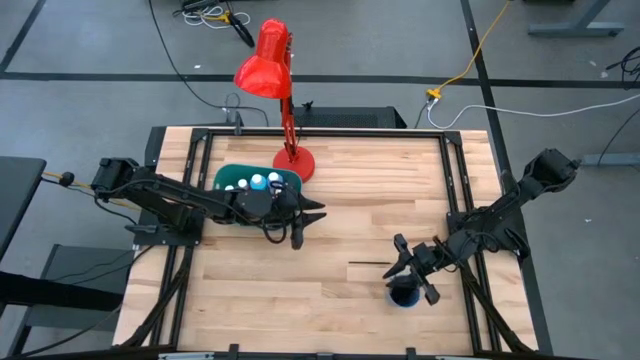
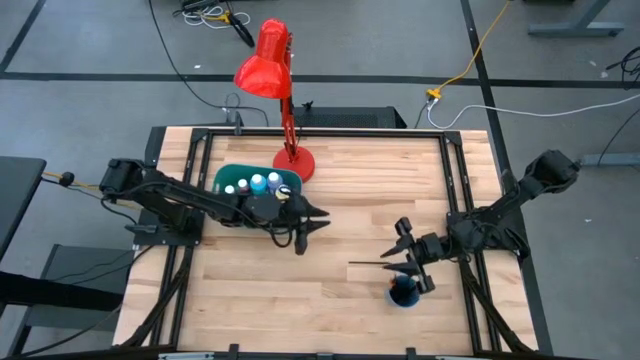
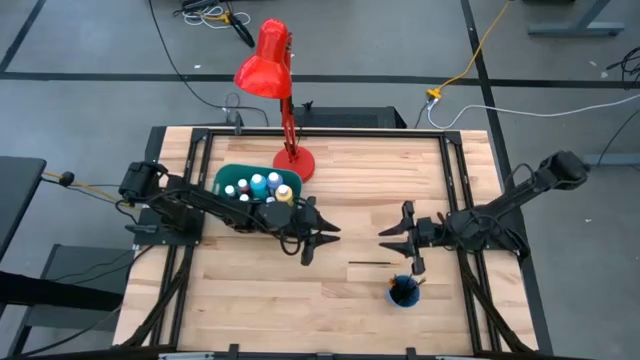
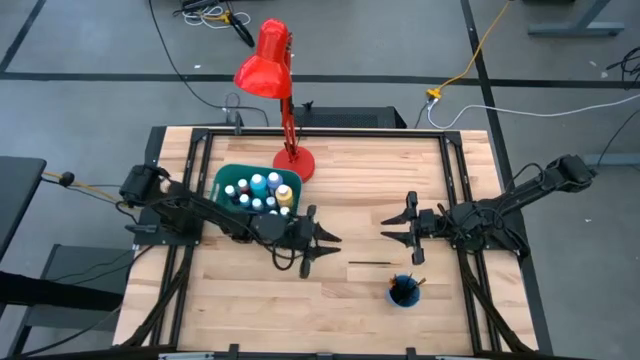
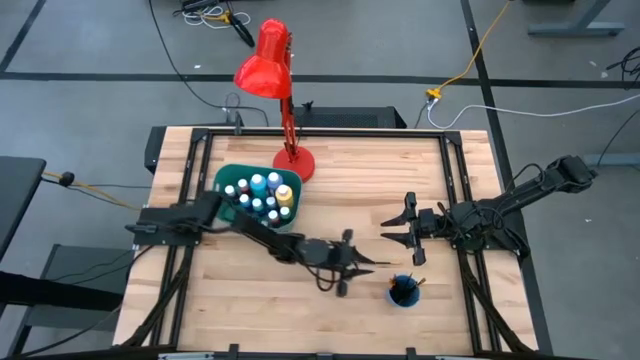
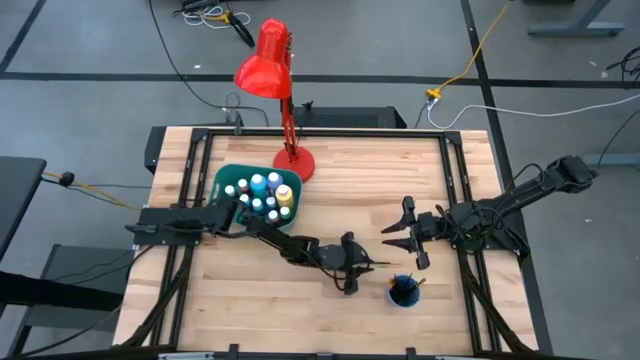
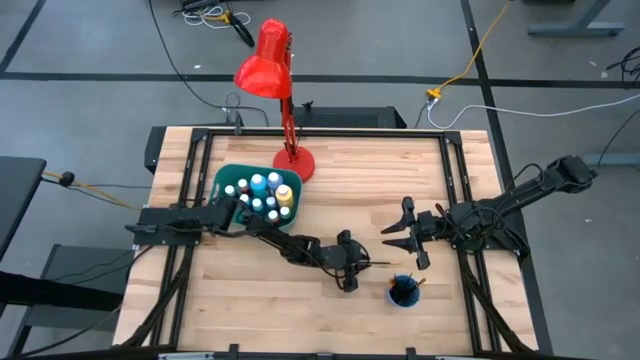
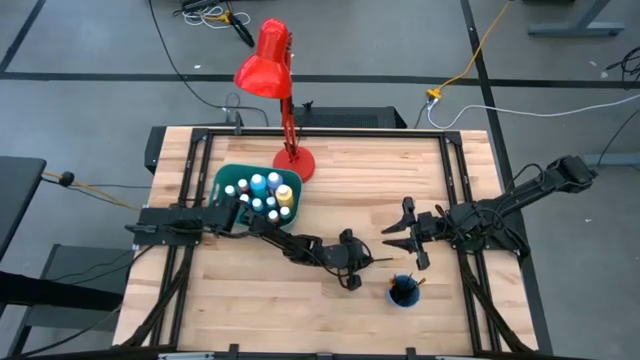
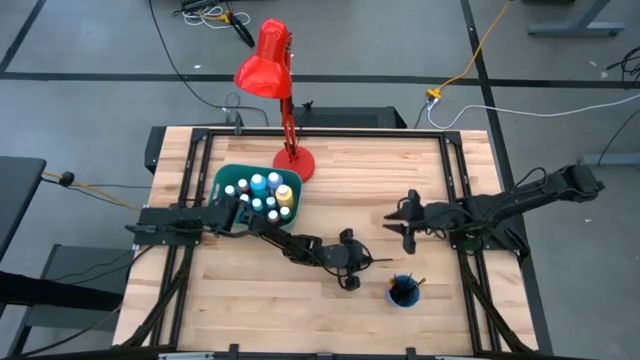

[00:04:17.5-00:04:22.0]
Task: Pick & Place Paint Supplies
Put the gold paint brush into the blue cup

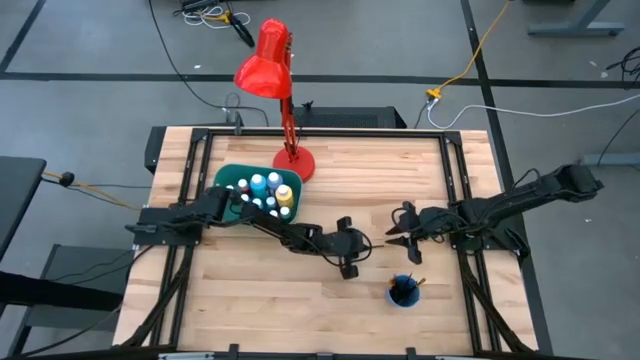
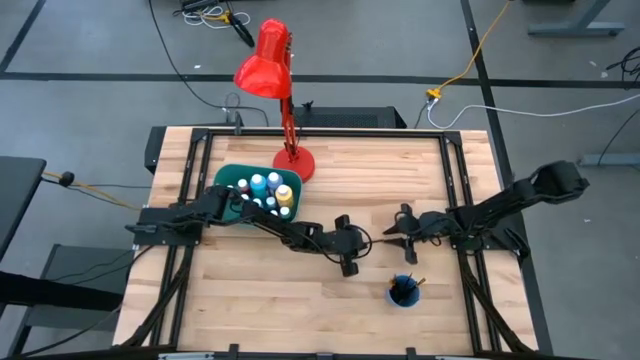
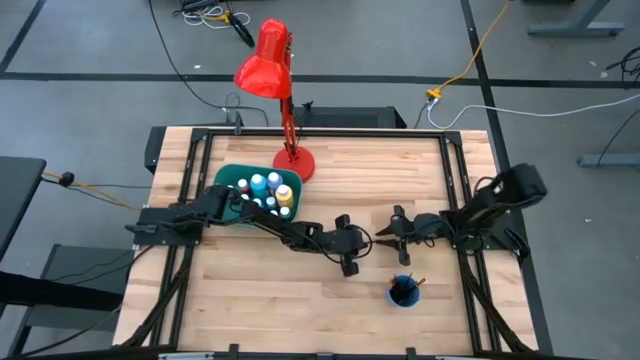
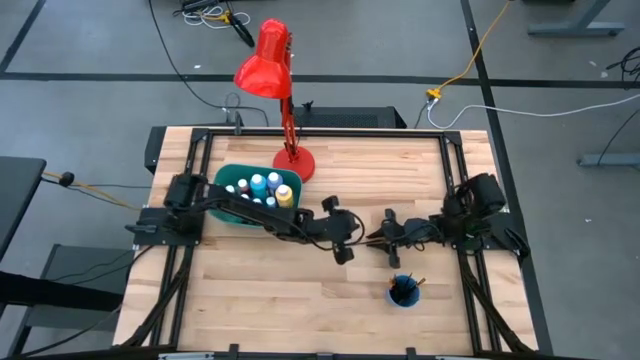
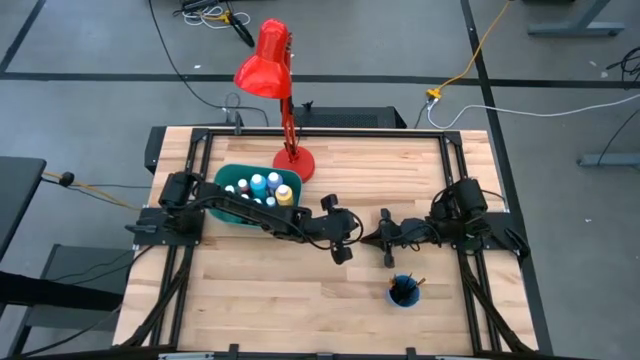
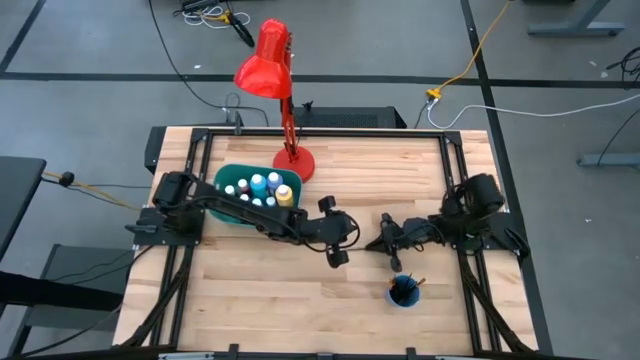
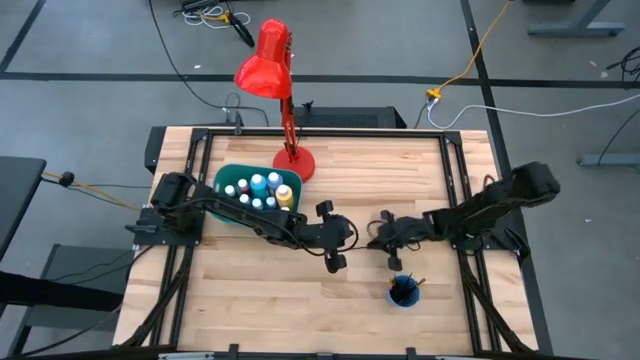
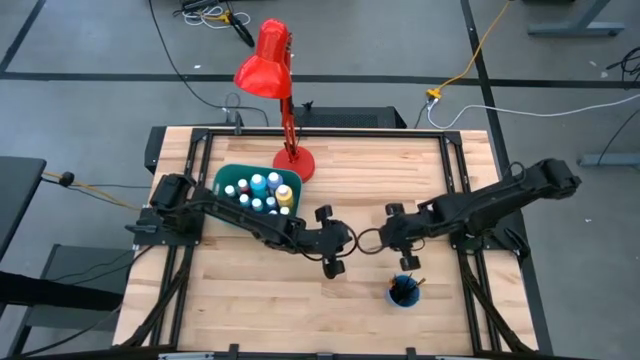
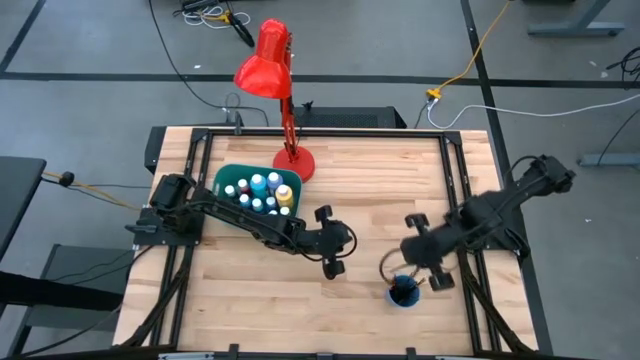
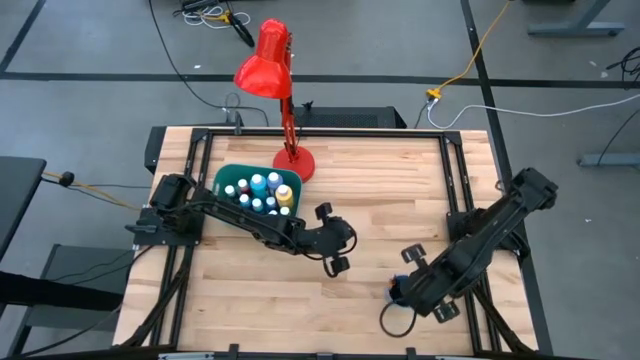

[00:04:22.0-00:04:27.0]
Put the gold paint brush into the blue cup

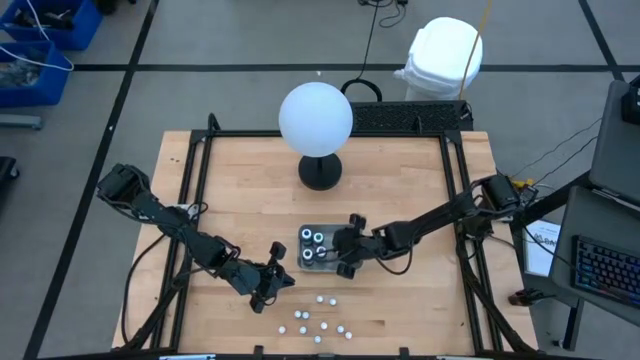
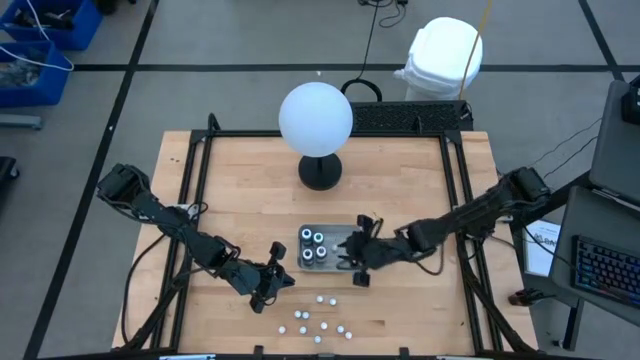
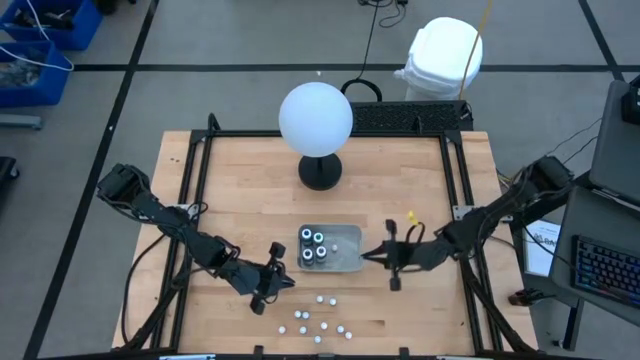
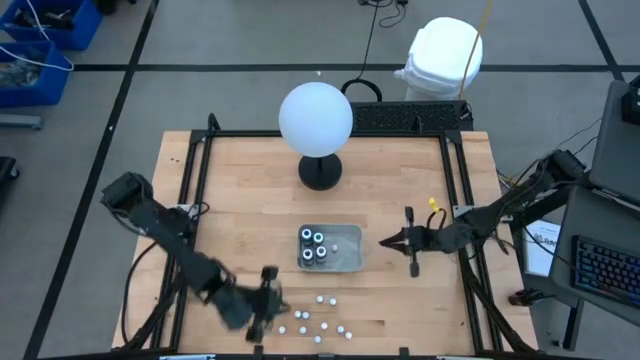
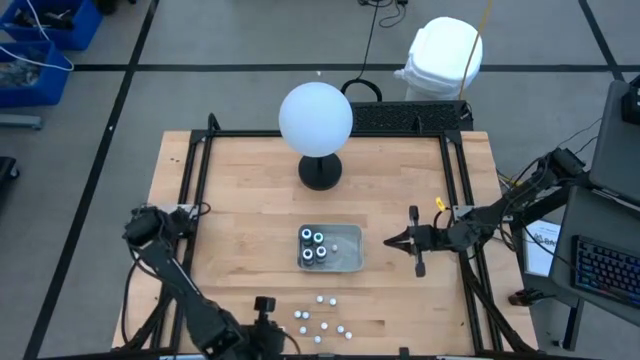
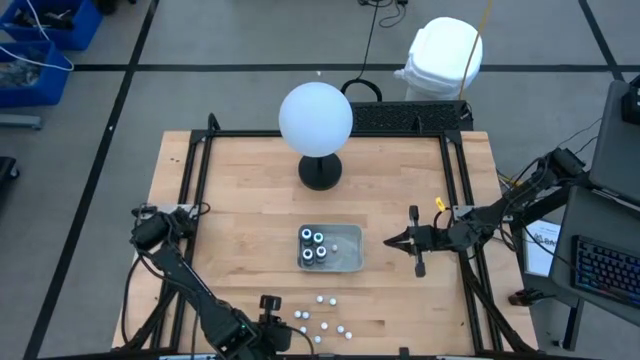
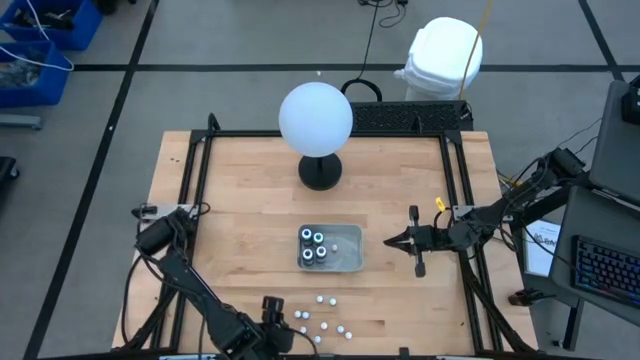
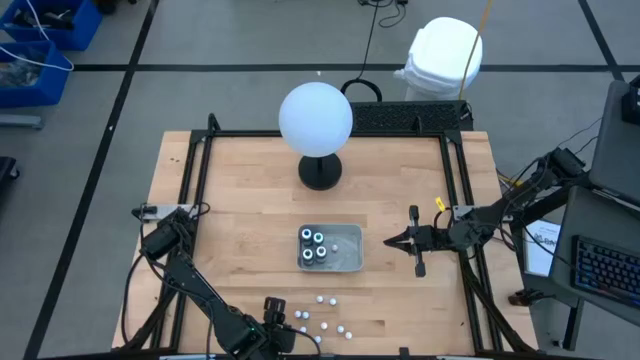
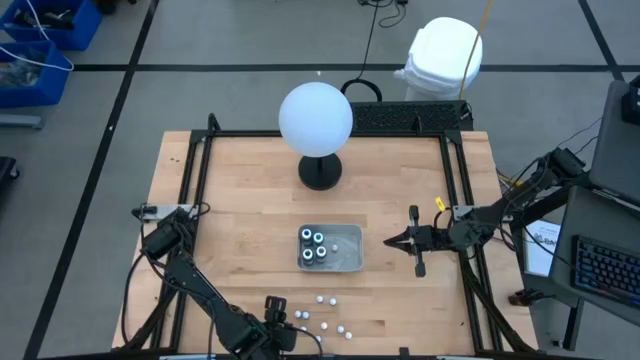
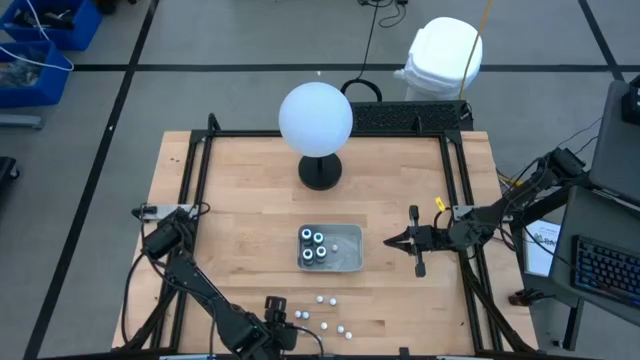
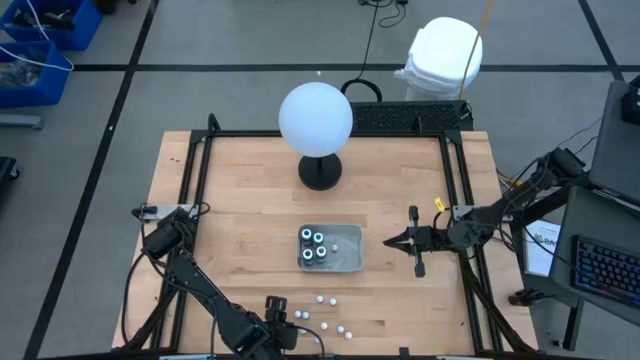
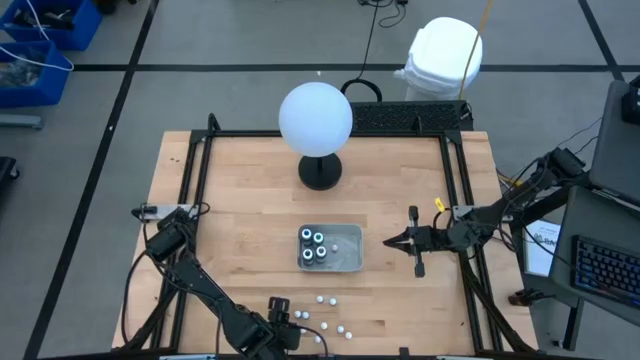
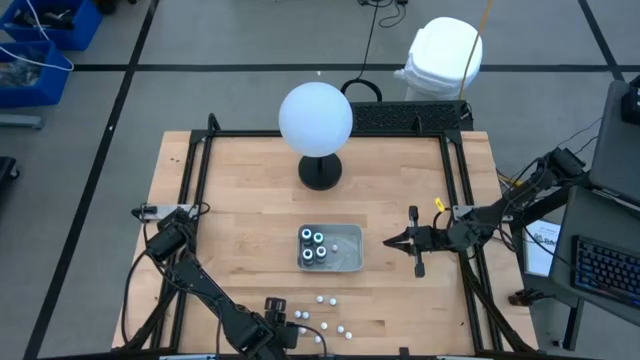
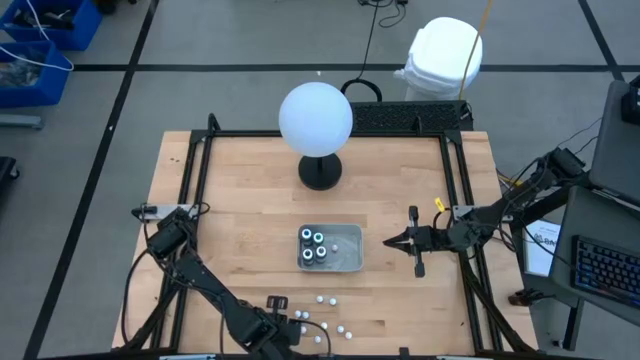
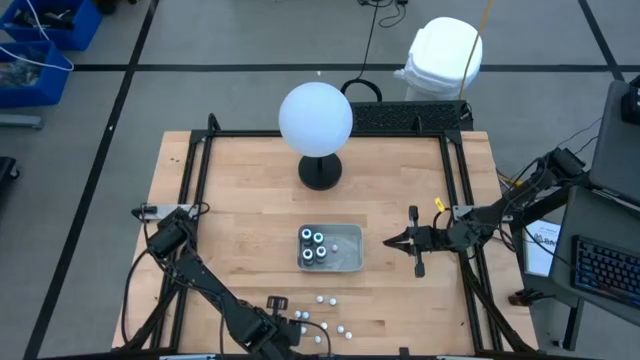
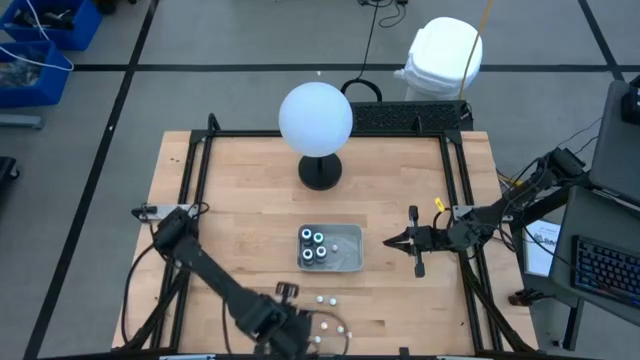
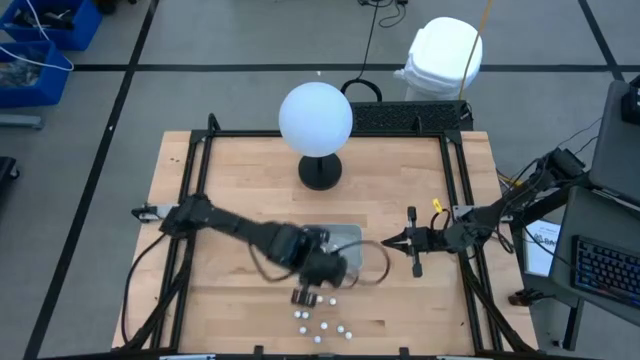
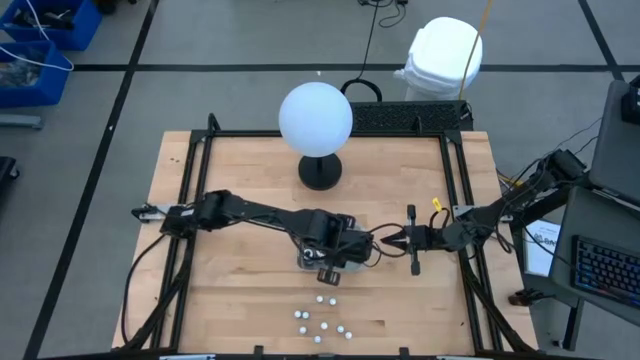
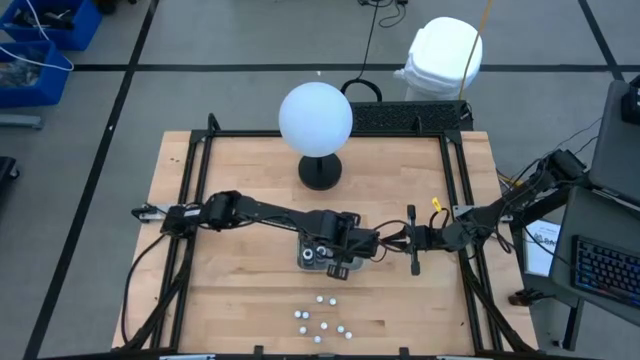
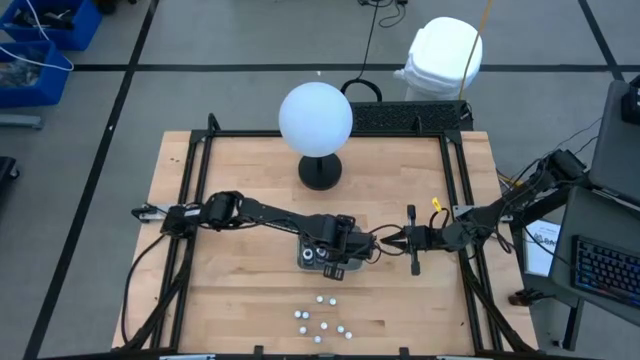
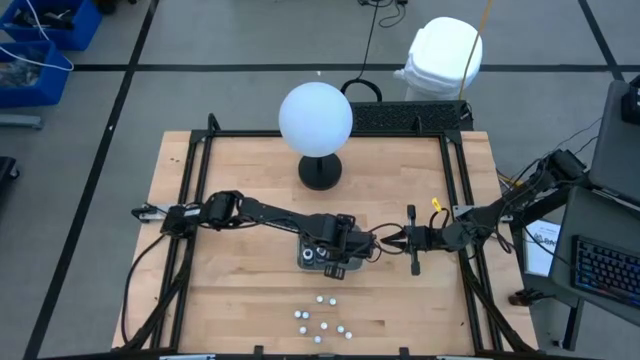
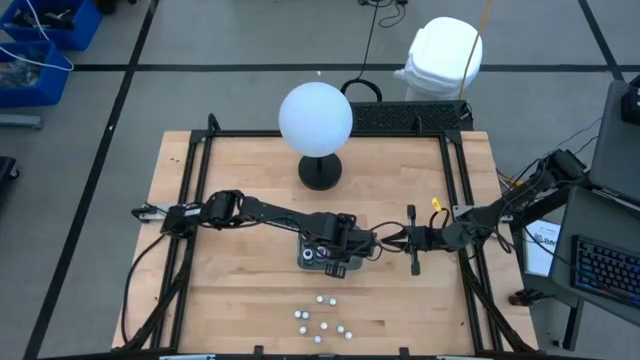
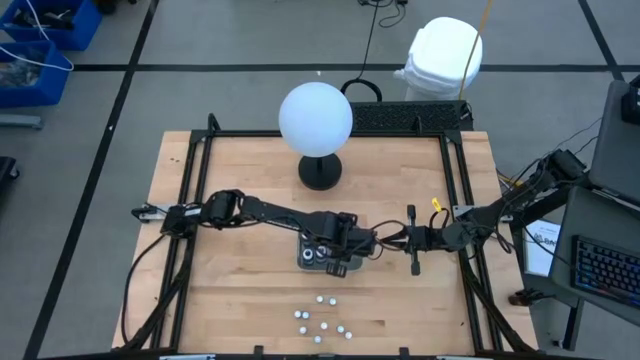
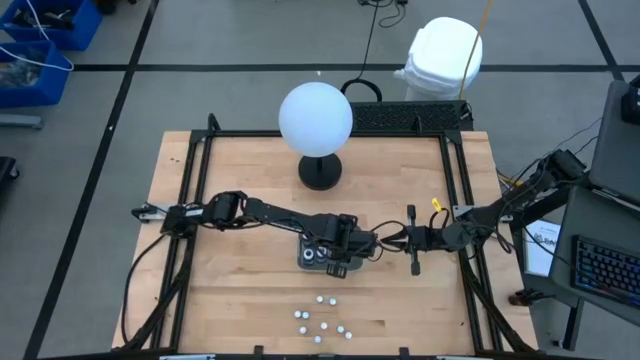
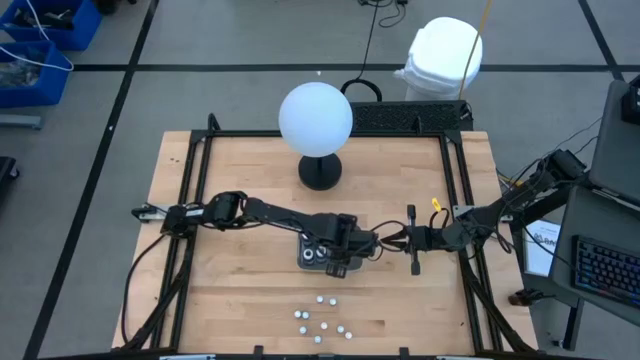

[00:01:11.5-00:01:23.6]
Task: Pick & Place food coloring
Put the small orange food coloring bottle into the gray bin
